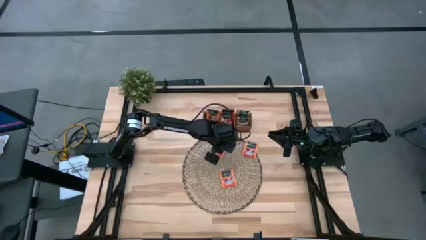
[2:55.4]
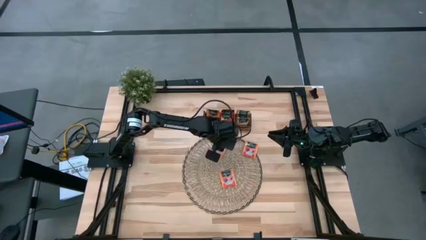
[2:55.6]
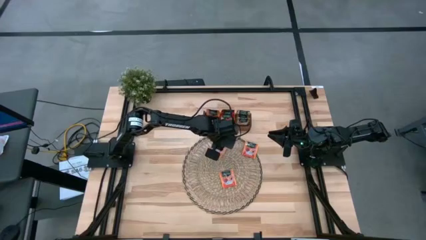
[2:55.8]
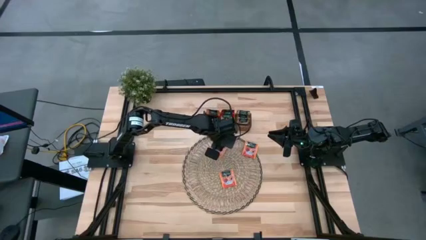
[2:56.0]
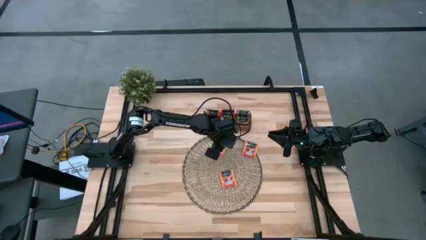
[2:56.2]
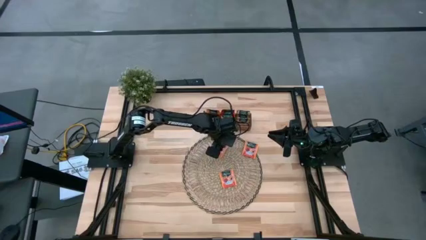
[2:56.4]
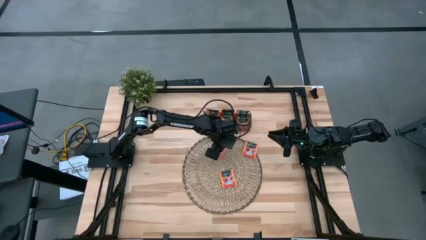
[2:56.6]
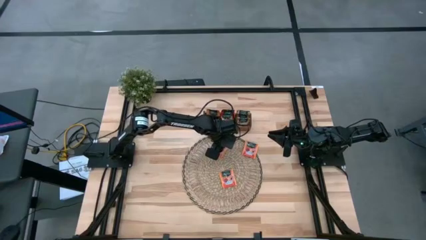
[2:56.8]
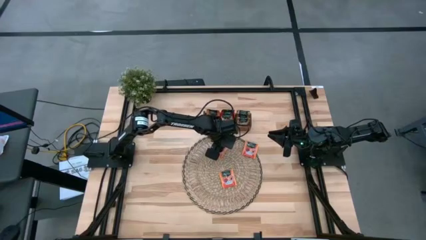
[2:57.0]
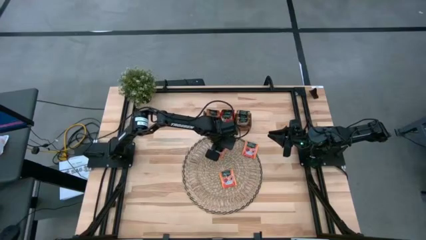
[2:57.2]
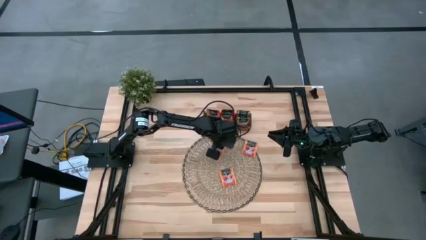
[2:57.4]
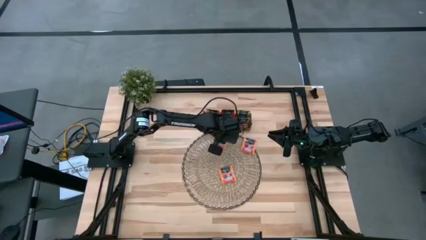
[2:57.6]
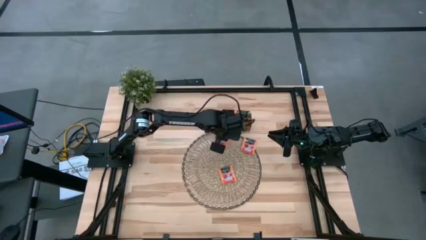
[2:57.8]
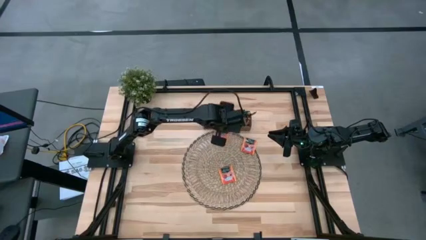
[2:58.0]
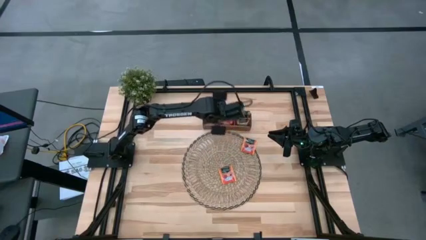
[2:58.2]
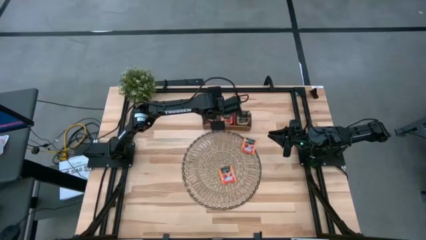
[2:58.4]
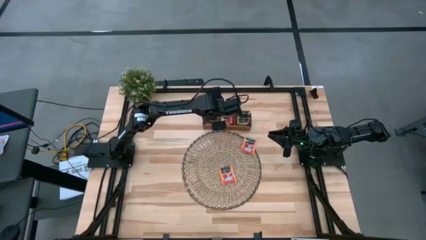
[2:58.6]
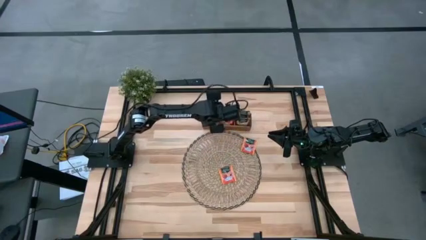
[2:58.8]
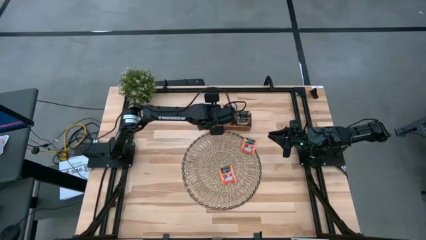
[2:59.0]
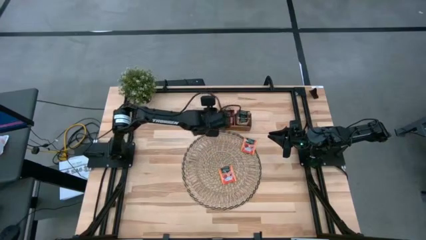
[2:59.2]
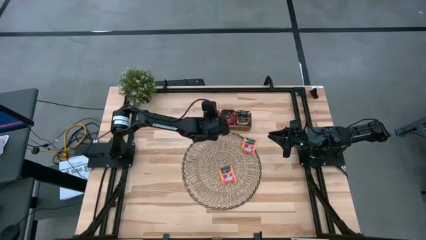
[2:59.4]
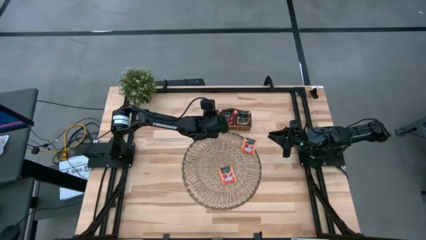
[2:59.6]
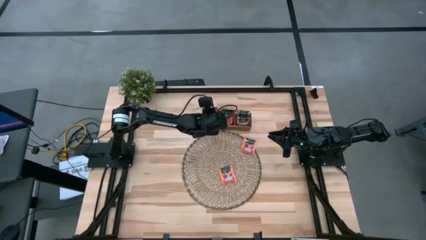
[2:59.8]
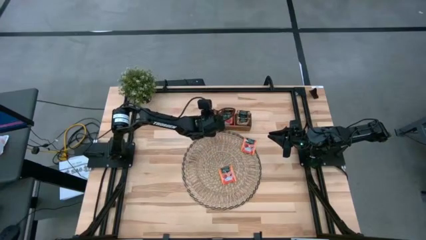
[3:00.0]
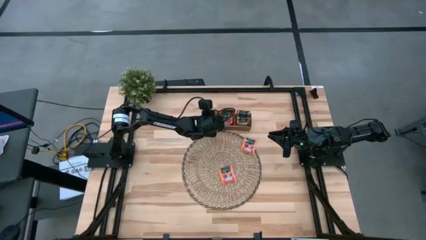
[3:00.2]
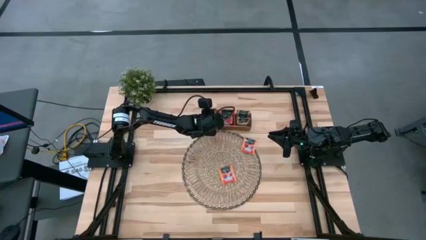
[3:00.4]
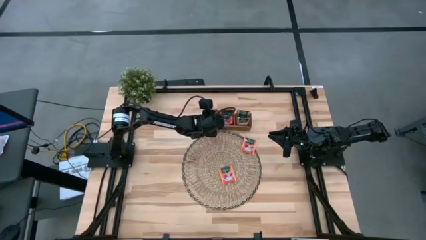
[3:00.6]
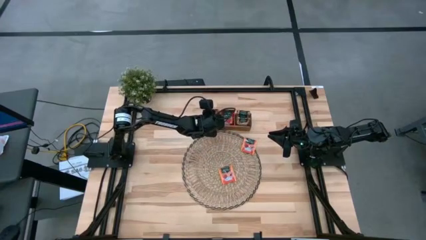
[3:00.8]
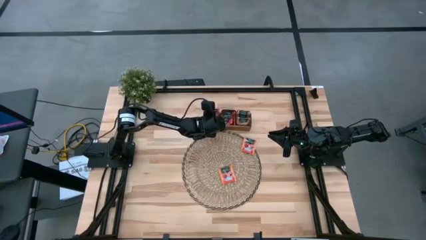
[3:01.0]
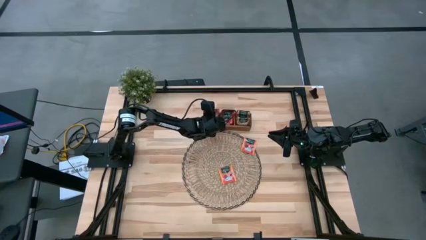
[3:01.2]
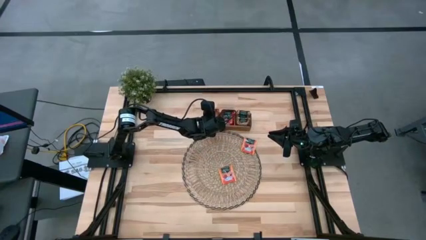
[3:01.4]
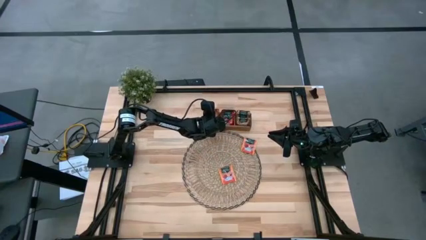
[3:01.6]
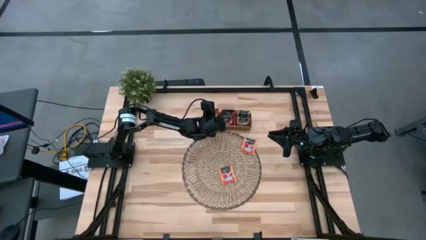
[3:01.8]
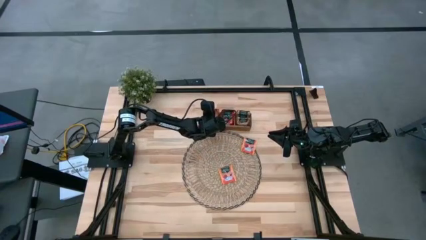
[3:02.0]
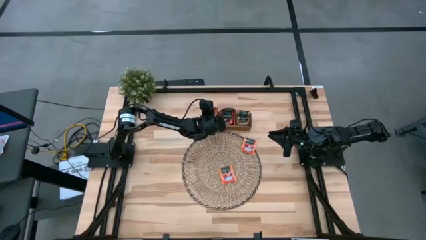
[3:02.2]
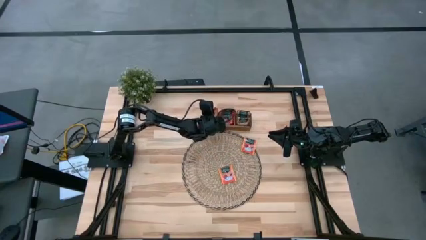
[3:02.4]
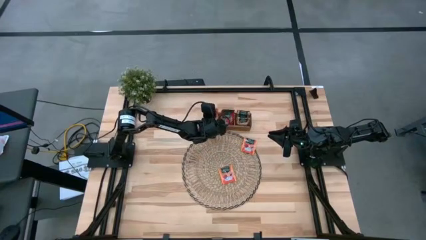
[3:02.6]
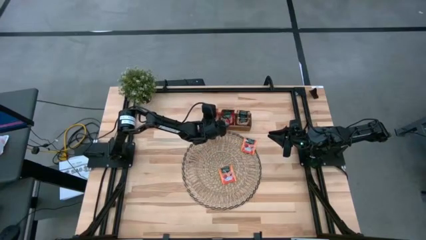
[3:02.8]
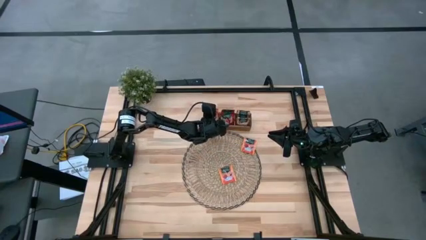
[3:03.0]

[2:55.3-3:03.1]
Task: Pick & Place Tea
Put the orange tea bag into the left section of the wooden organizer

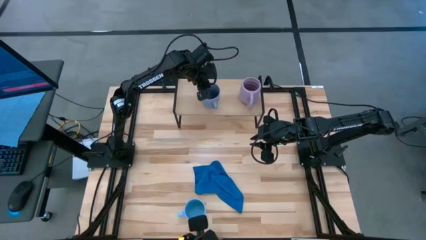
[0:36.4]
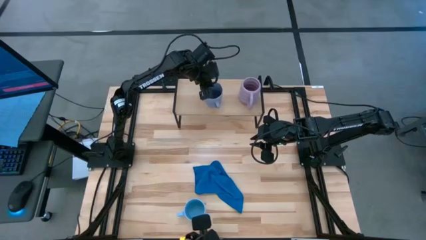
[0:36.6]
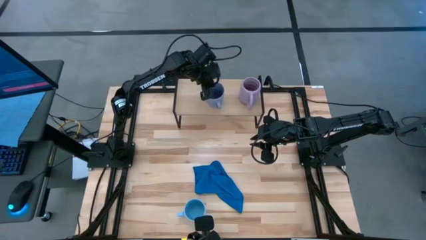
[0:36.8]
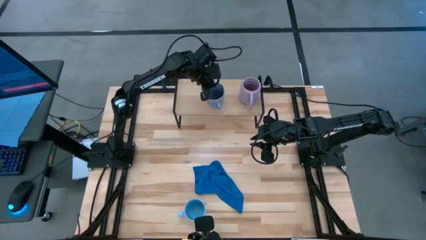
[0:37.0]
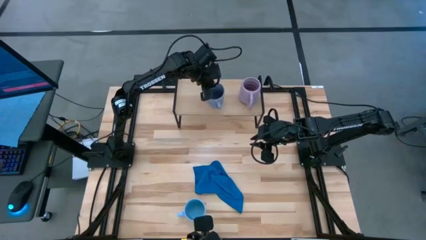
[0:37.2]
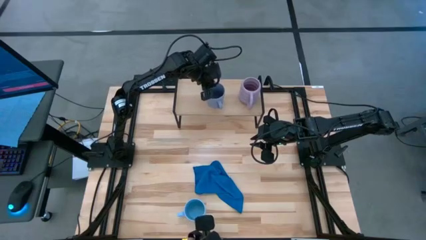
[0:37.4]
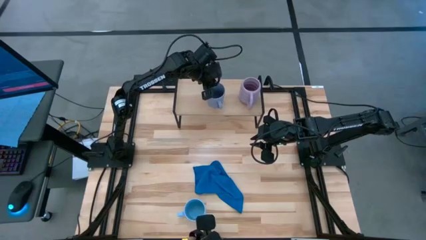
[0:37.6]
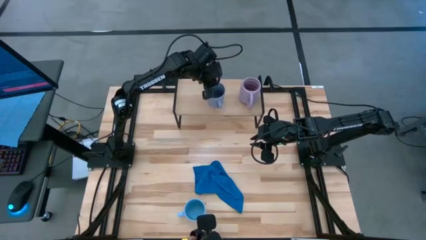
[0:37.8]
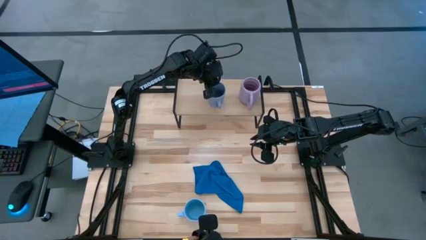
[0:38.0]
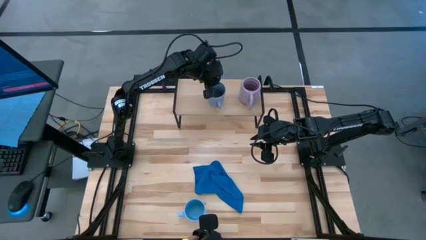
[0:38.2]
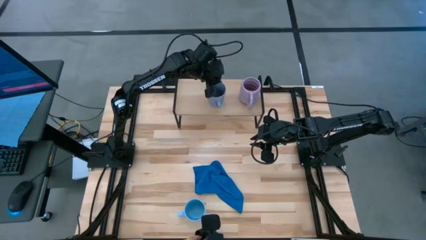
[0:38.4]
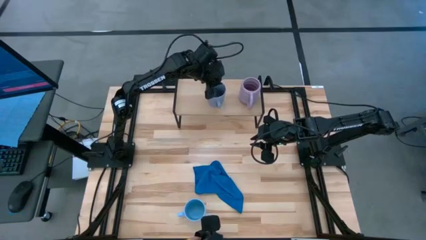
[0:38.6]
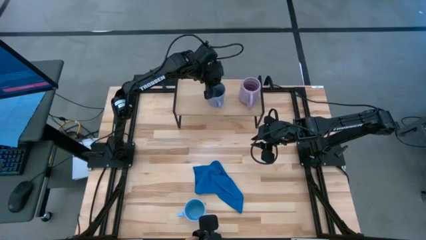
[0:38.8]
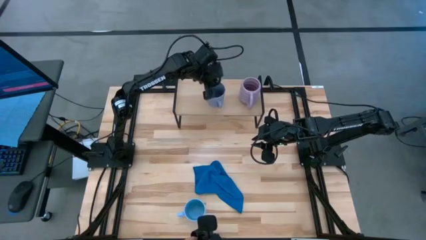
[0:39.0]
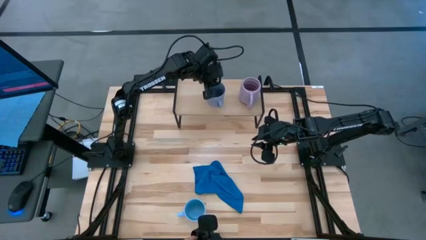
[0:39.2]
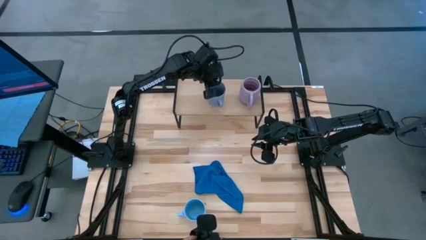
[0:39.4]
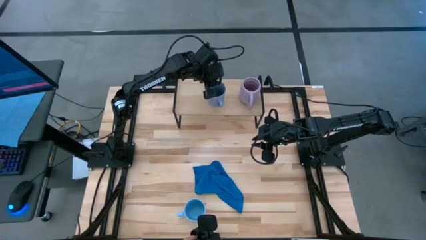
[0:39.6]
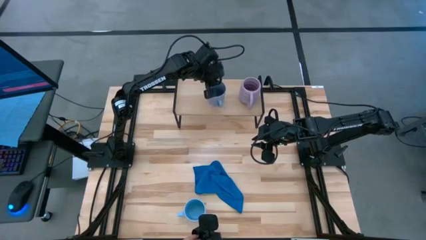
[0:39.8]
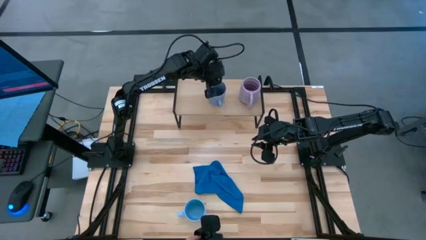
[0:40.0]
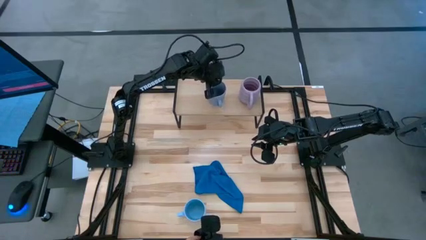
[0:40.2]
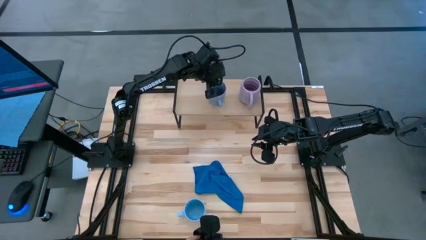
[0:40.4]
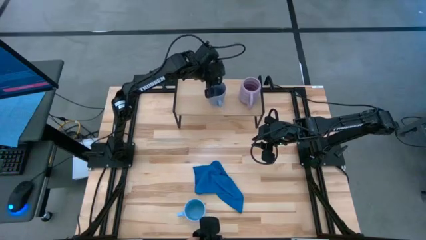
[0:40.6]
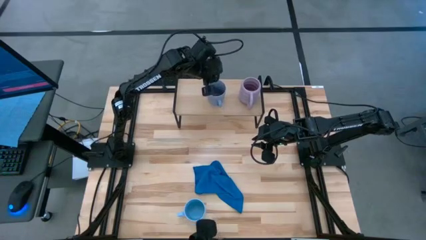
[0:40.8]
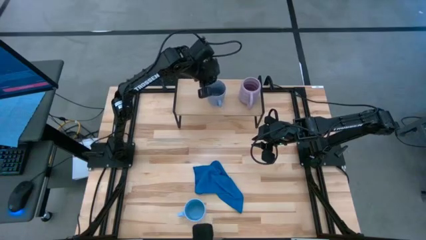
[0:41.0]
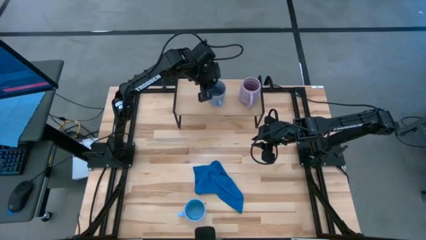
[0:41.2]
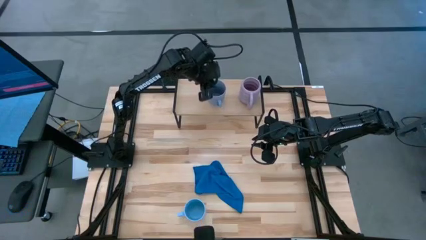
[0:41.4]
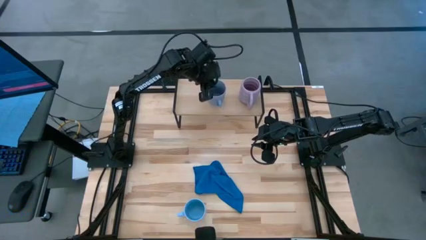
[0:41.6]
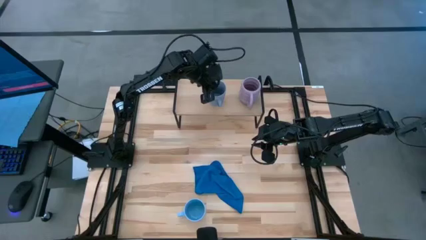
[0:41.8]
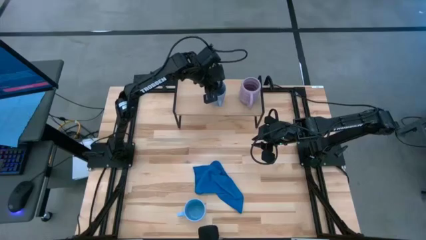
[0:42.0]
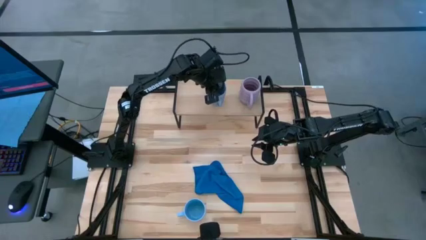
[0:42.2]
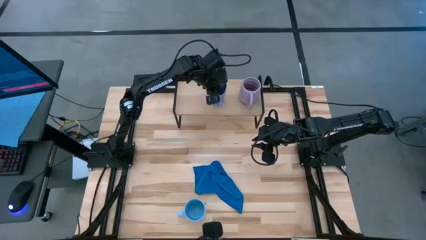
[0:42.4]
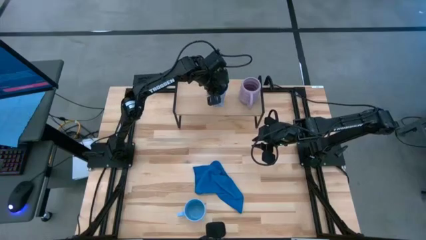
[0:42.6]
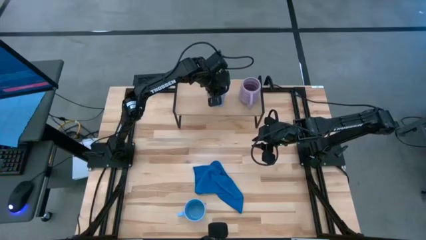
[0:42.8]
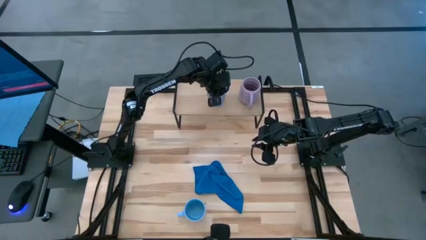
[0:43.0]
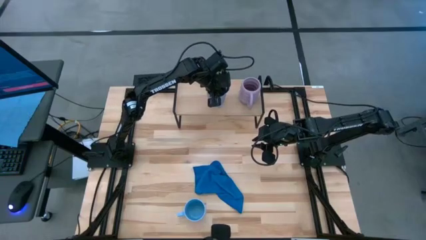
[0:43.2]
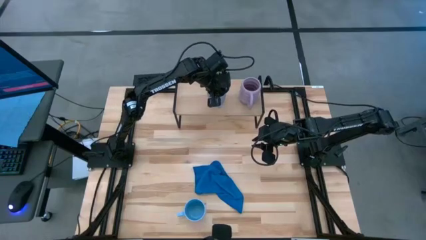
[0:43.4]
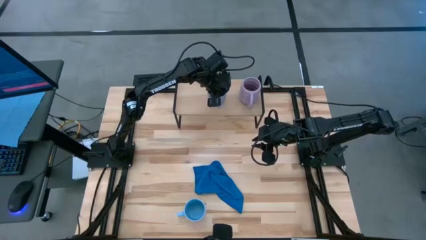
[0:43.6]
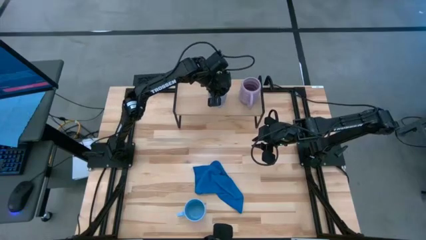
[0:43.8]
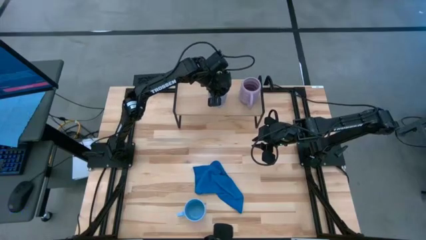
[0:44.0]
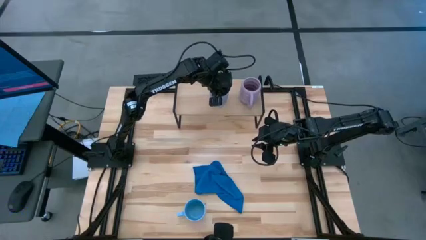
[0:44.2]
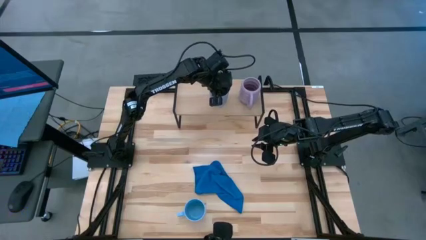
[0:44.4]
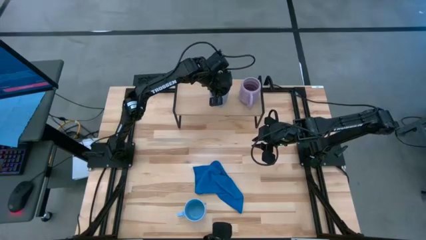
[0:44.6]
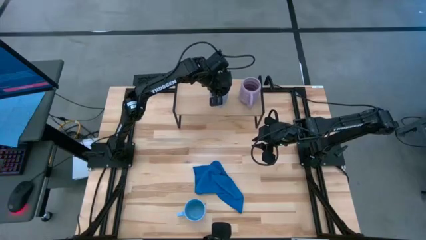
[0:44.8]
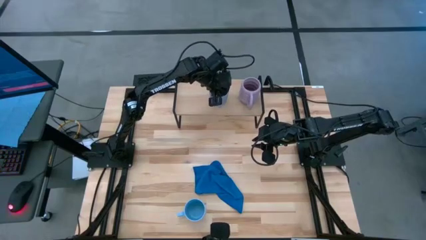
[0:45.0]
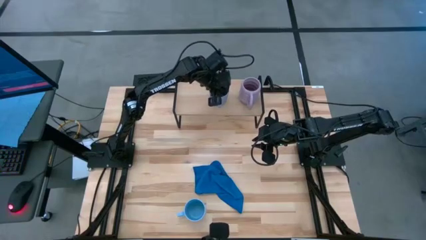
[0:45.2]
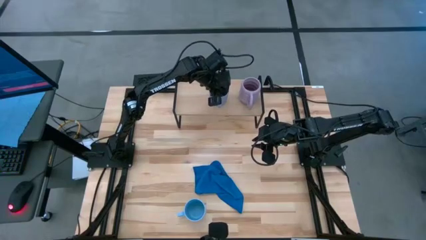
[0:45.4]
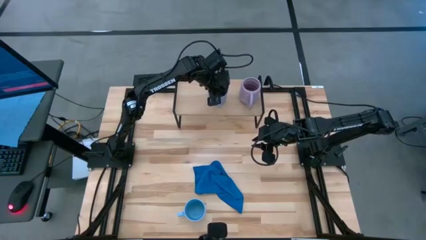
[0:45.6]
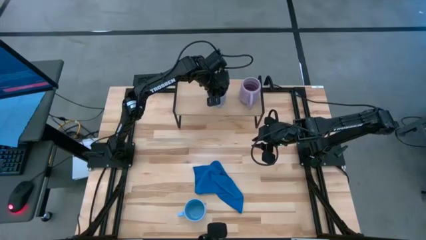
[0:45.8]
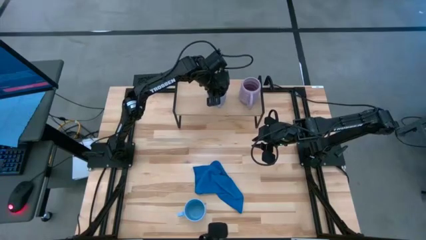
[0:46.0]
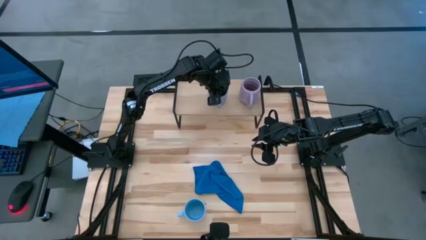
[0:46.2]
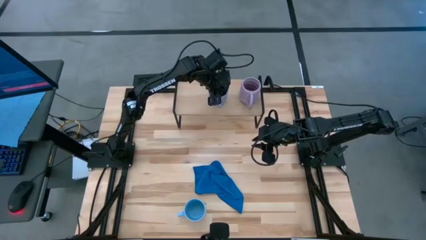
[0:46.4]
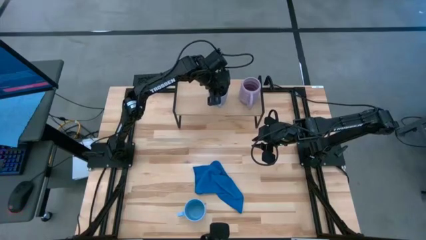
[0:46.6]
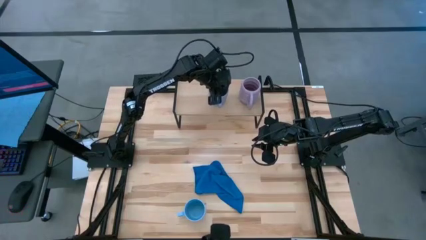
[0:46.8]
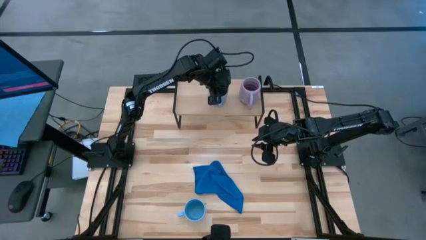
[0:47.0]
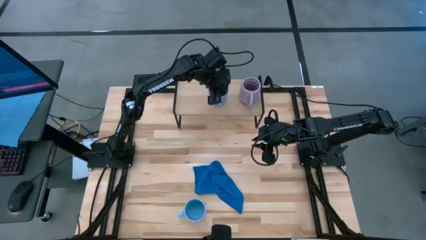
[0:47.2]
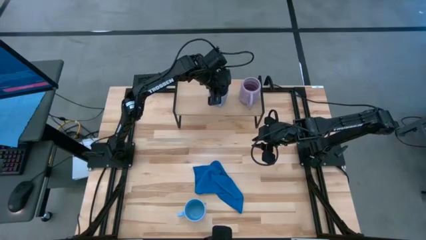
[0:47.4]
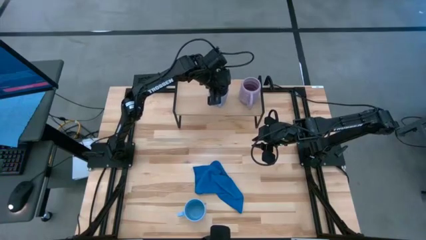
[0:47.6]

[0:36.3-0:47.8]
Task: Stack small to large cups/mugs on shelf
Put the blue mug on the shelf
